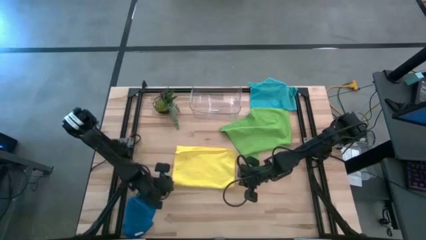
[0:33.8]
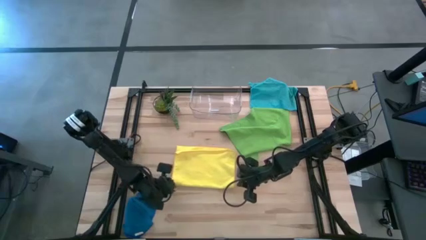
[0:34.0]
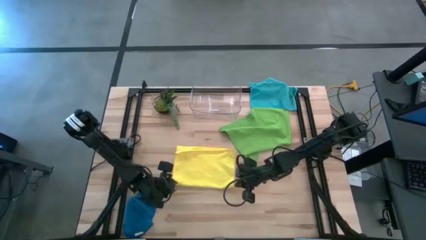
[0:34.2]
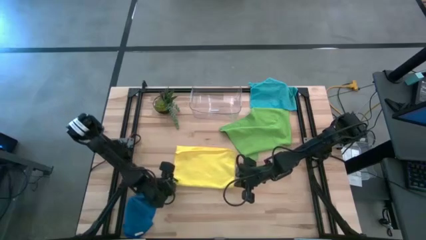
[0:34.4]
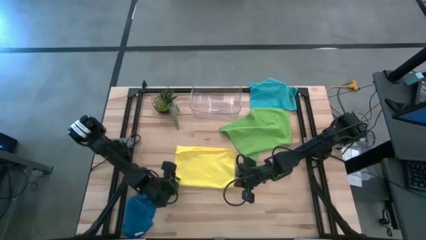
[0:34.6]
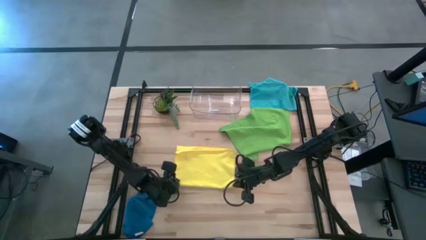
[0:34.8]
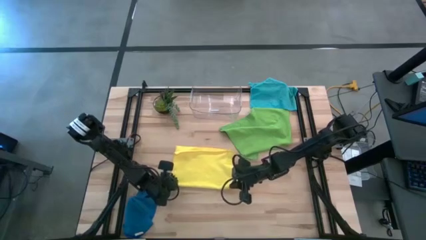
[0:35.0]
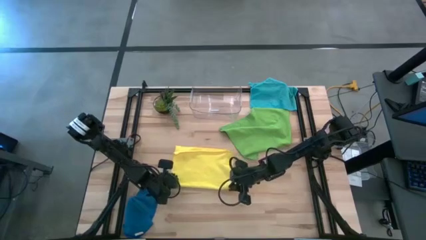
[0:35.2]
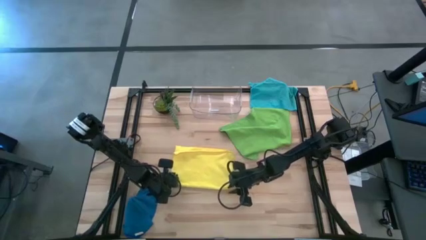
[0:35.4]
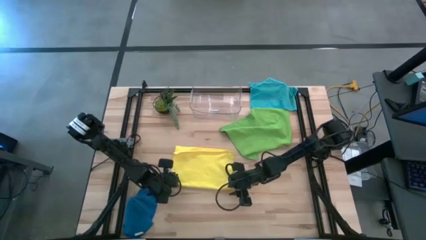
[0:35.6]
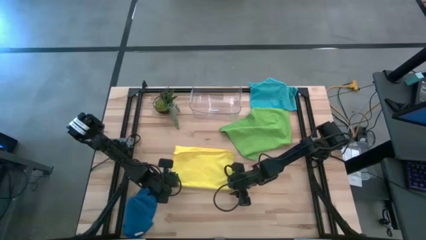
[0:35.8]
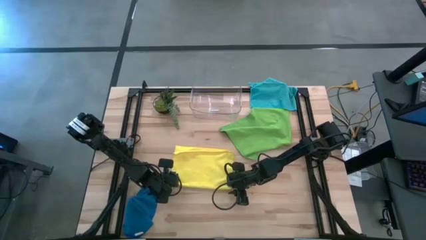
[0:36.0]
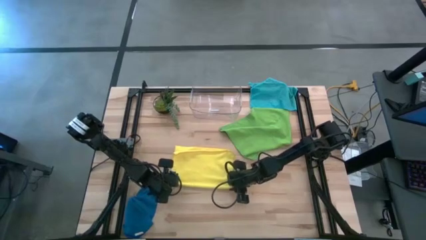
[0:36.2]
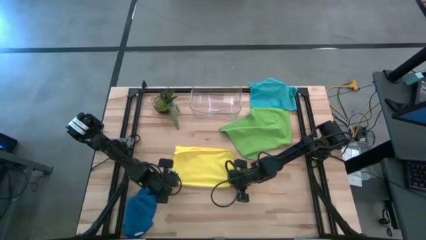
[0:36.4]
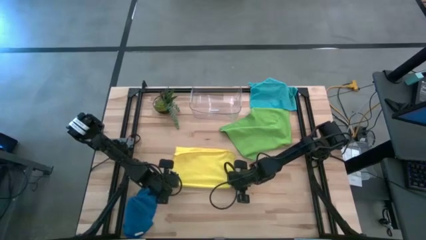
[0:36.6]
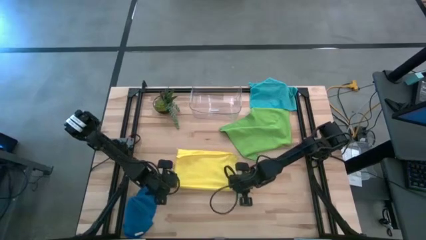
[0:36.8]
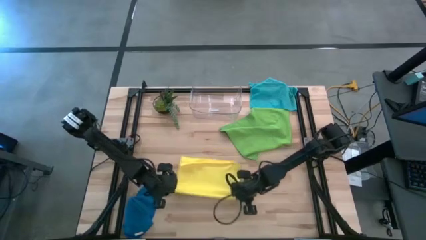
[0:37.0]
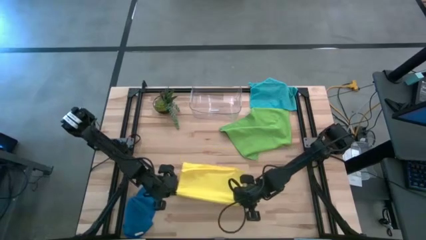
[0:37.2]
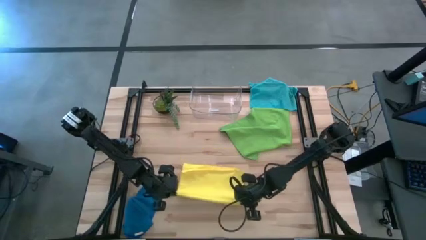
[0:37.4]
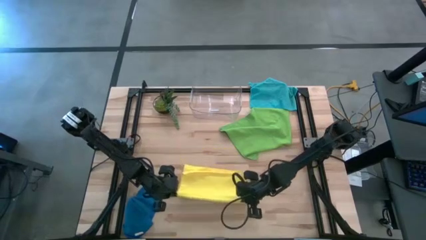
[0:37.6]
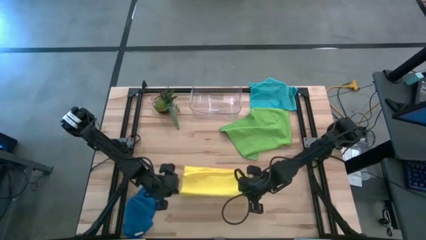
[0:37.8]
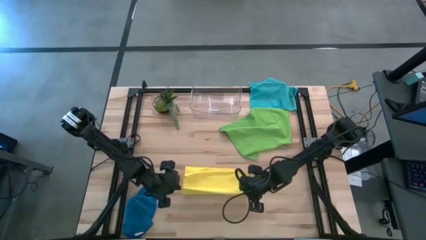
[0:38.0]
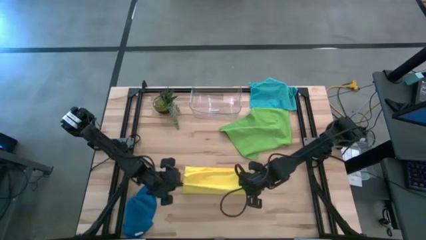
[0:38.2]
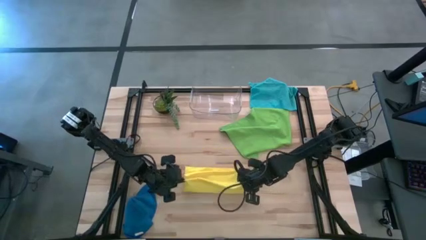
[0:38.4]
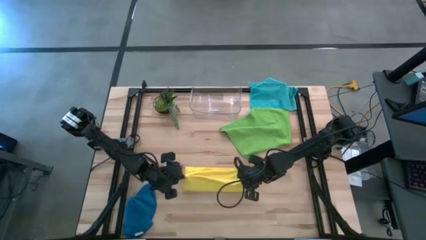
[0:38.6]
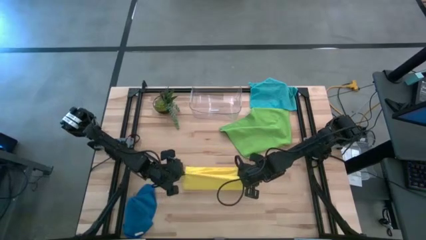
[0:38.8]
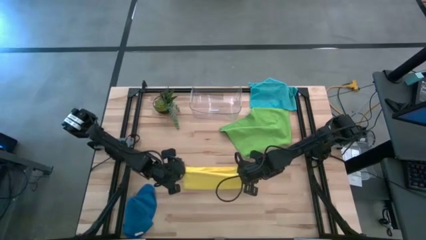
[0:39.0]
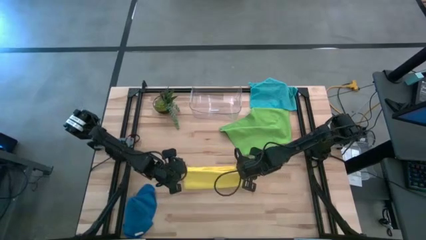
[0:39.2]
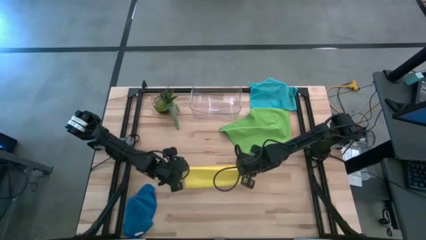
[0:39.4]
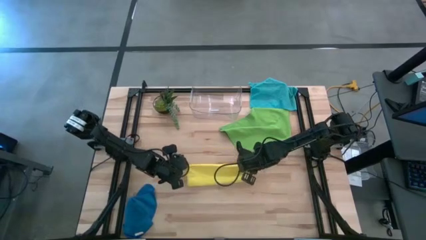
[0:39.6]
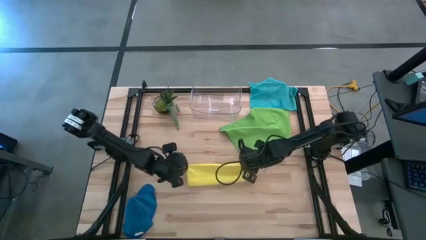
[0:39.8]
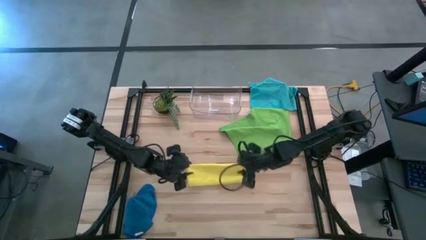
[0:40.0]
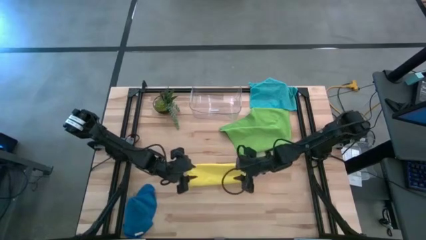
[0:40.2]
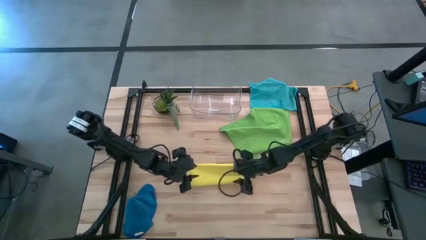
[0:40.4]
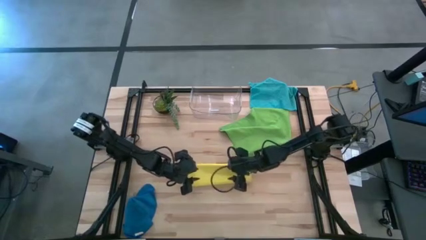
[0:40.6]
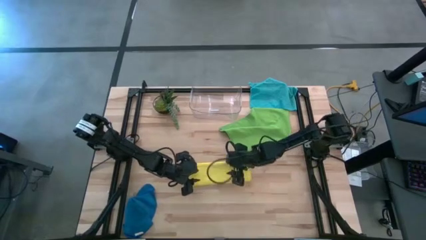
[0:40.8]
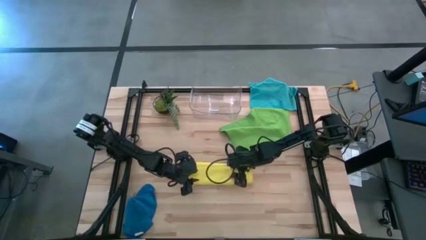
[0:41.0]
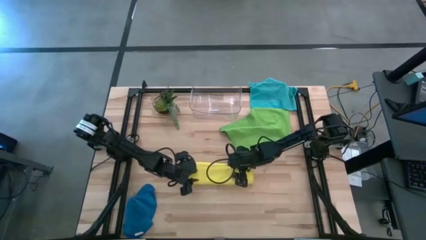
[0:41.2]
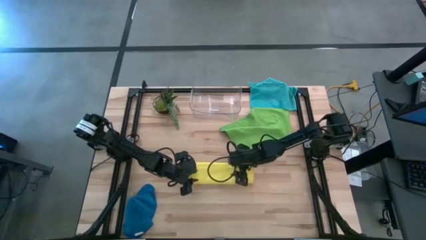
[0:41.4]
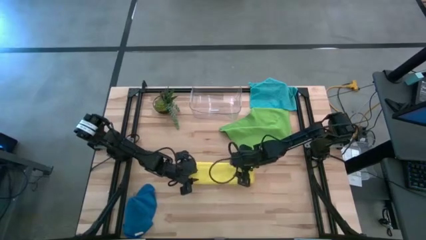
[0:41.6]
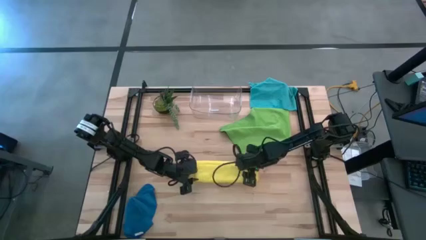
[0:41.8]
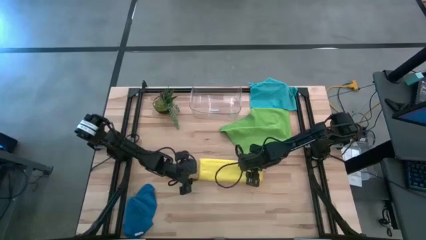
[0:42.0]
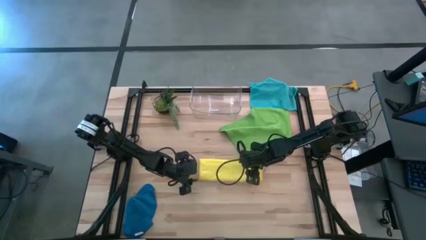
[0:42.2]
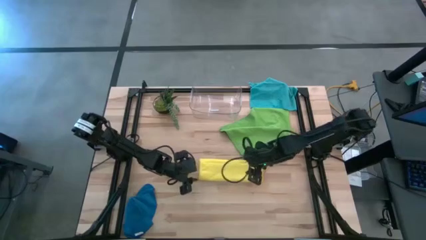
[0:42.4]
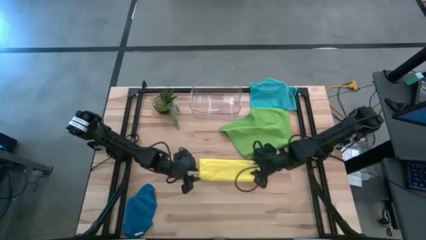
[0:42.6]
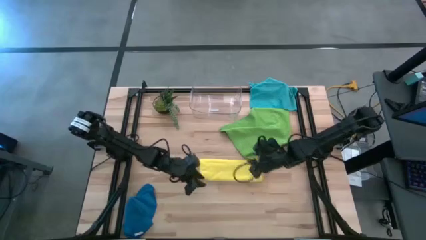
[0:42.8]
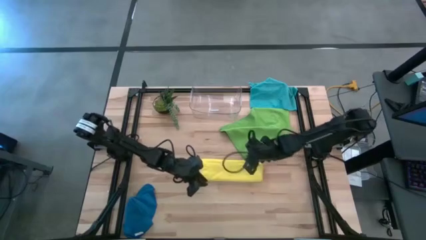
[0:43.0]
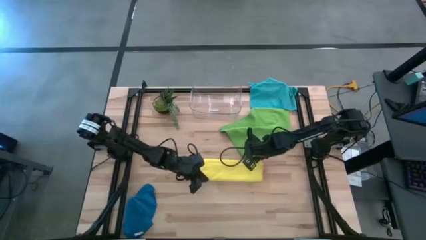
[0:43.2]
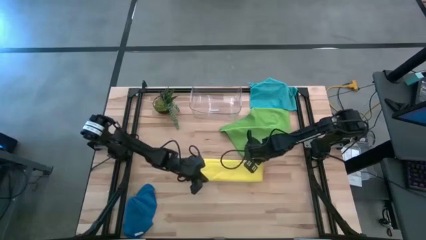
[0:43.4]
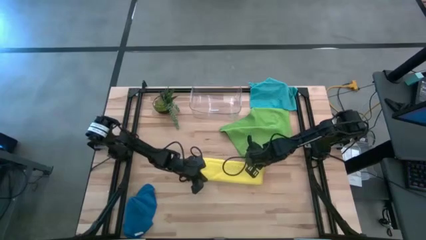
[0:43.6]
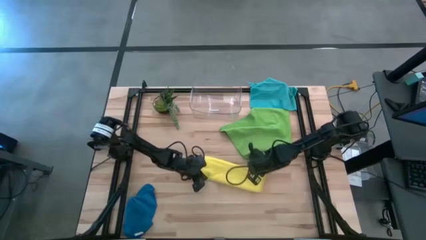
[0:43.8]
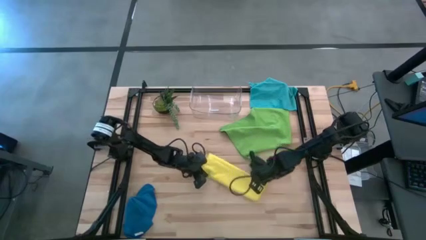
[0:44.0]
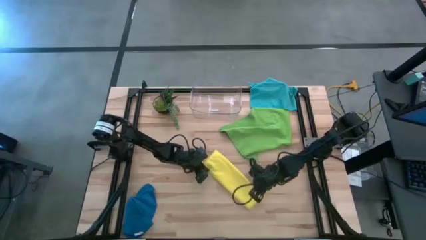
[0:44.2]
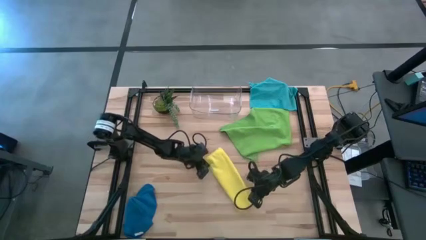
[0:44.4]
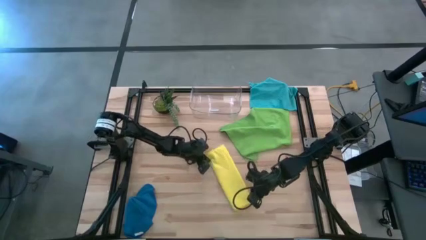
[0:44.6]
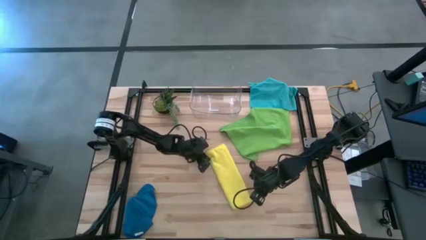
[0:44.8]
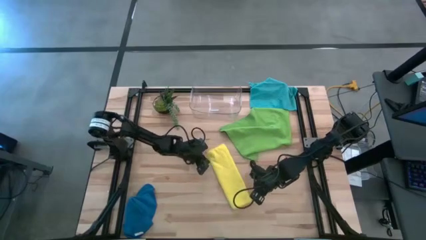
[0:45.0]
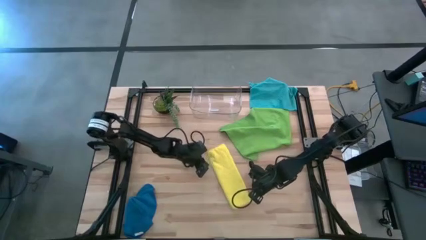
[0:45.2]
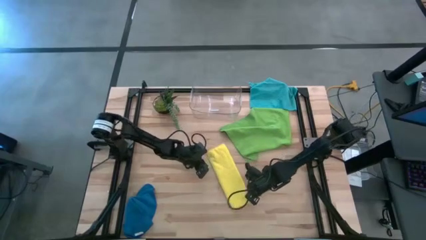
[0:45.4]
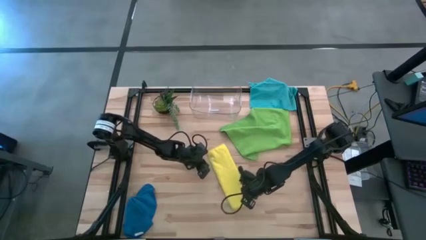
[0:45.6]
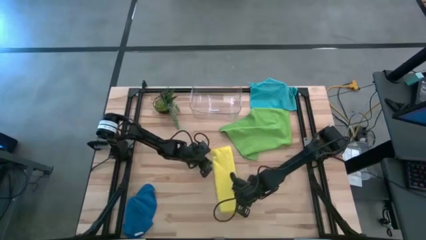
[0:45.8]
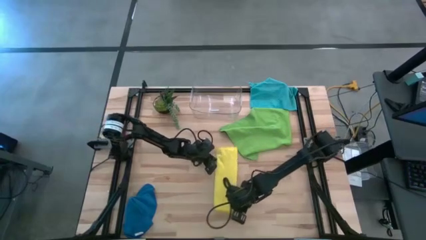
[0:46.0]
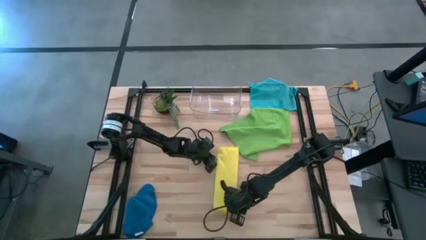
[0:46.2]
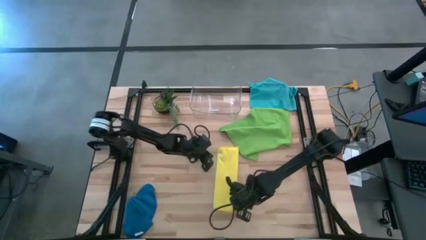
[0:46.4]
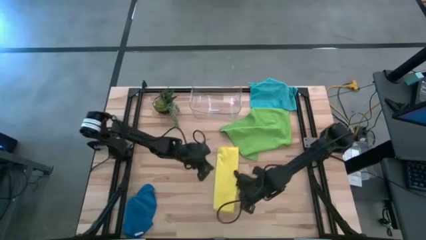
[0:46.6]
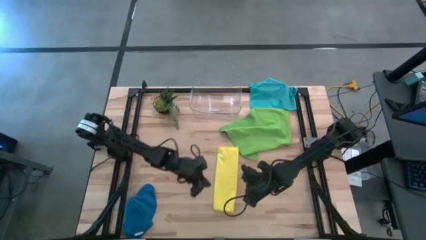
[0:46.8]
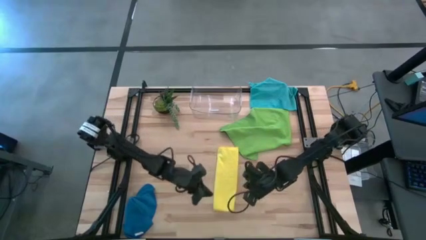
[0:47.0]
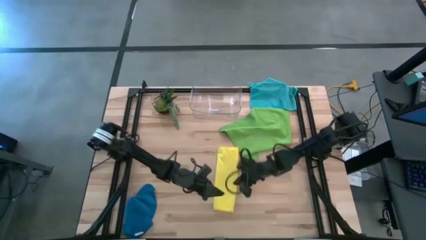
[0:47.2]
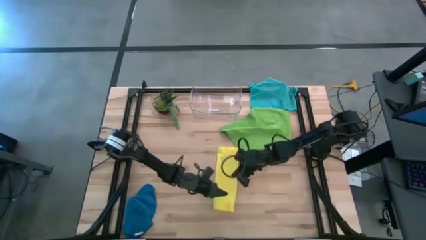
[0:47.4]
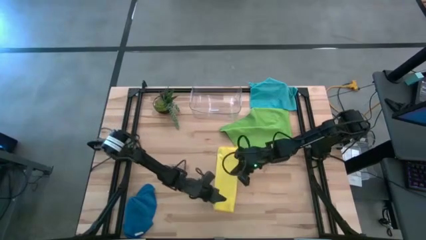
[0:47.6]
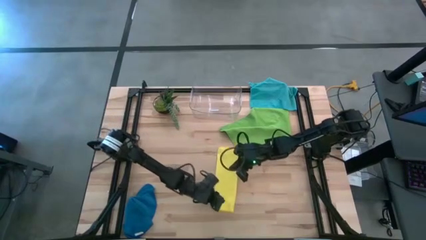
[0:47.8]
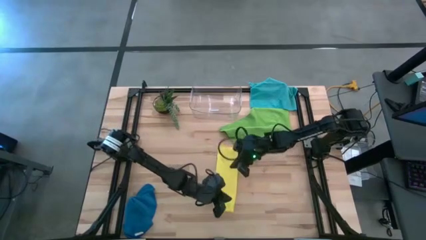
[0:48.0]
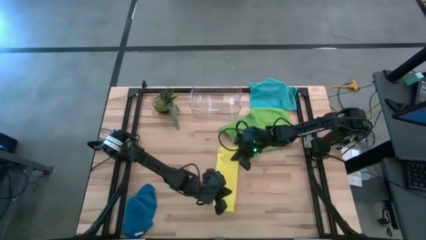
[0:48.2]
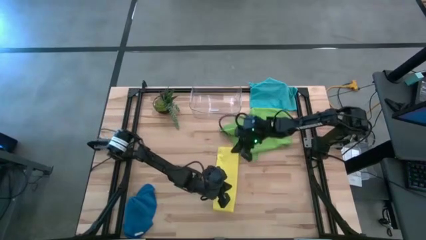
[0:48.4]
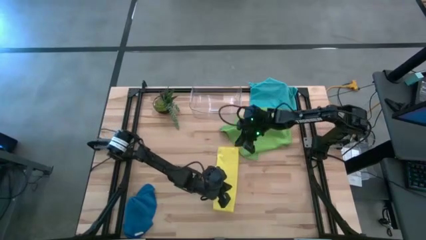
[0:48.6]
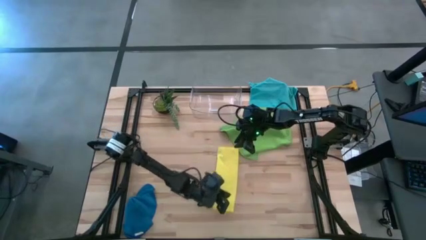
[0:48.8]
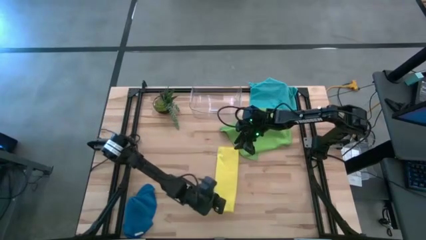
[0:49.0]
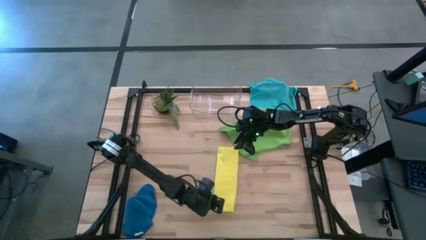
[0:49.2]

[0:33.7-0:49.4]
Task: Fold microfiber towels
Fold the yellow towel
